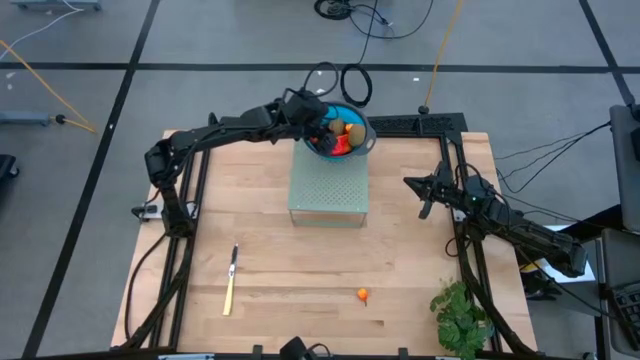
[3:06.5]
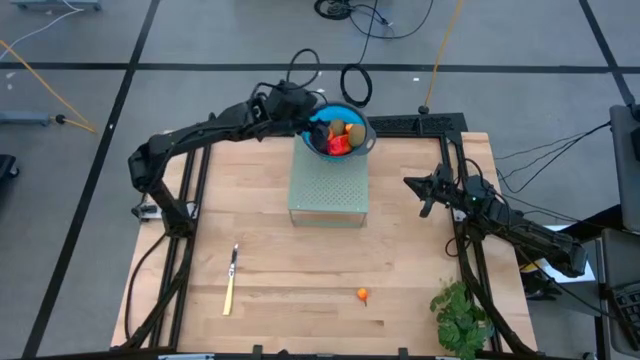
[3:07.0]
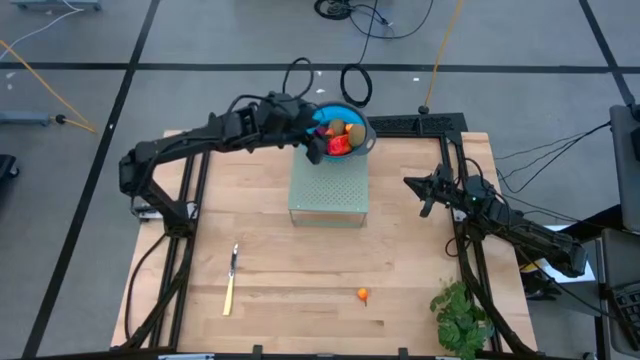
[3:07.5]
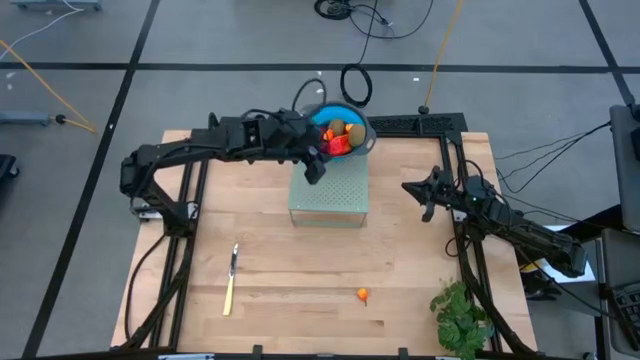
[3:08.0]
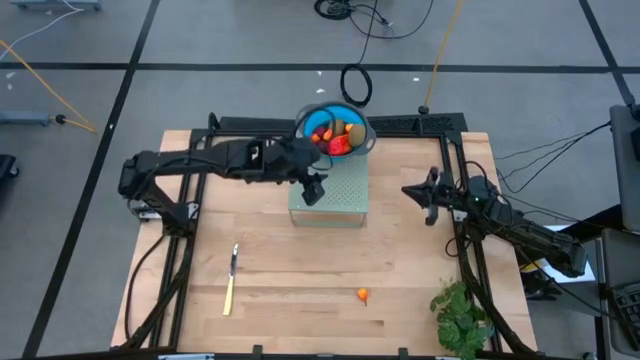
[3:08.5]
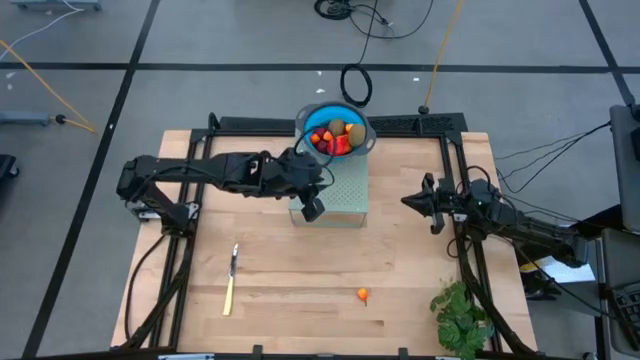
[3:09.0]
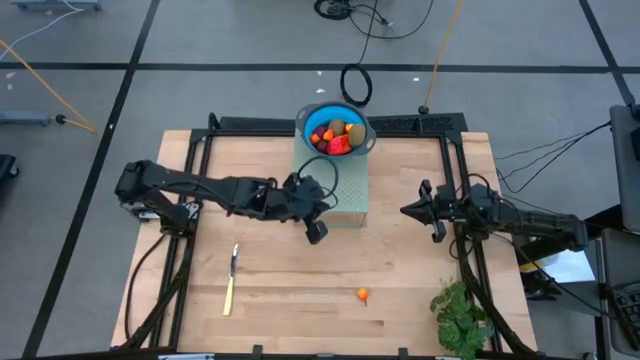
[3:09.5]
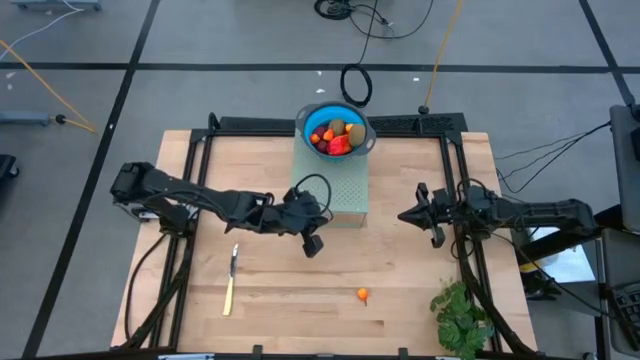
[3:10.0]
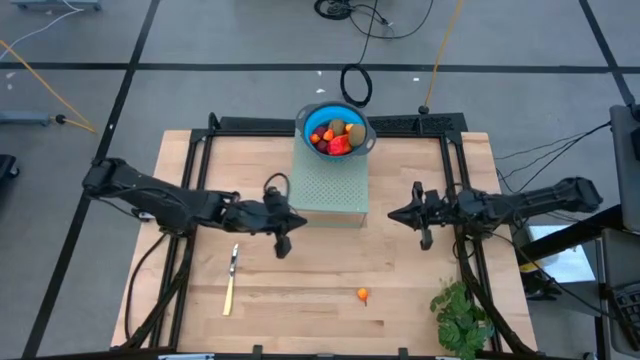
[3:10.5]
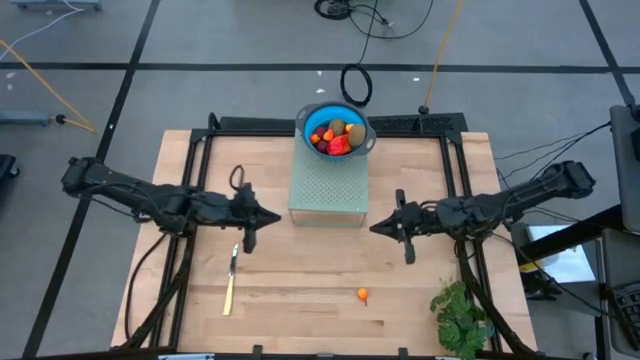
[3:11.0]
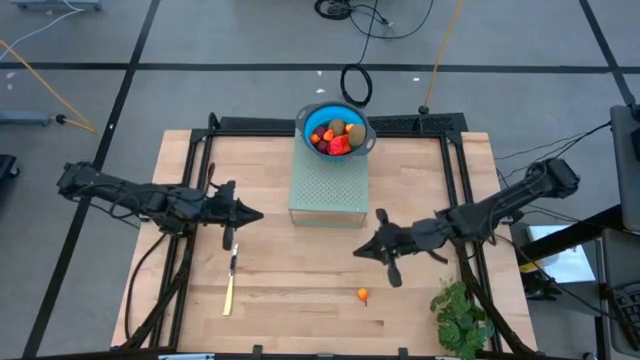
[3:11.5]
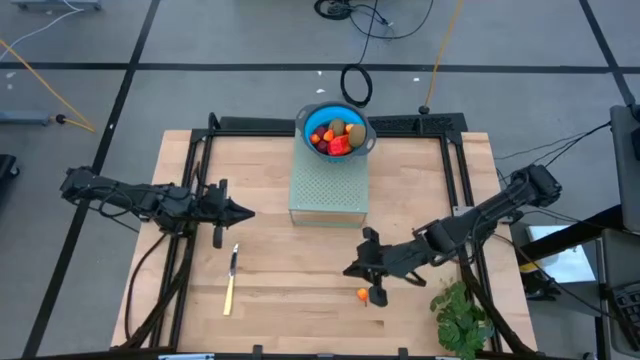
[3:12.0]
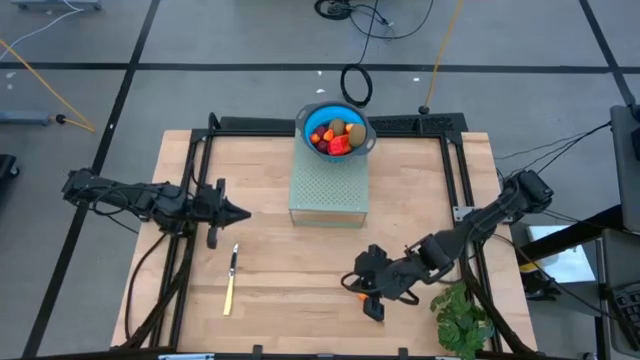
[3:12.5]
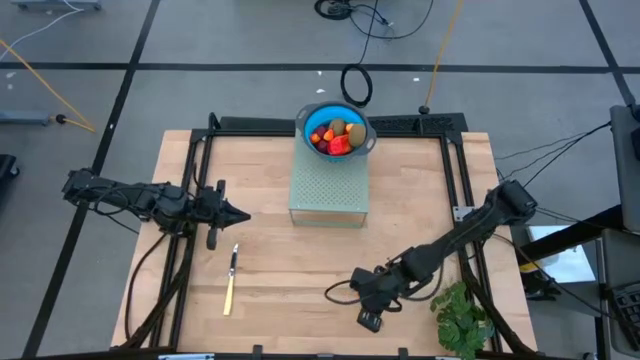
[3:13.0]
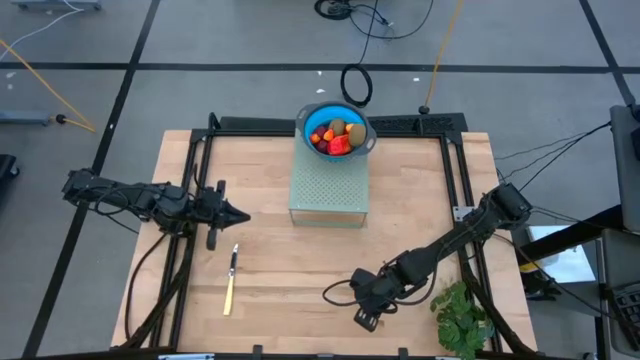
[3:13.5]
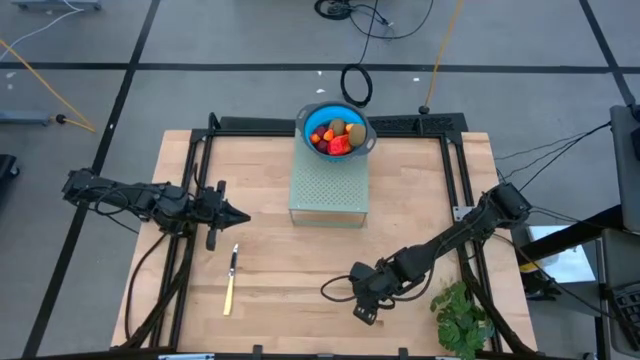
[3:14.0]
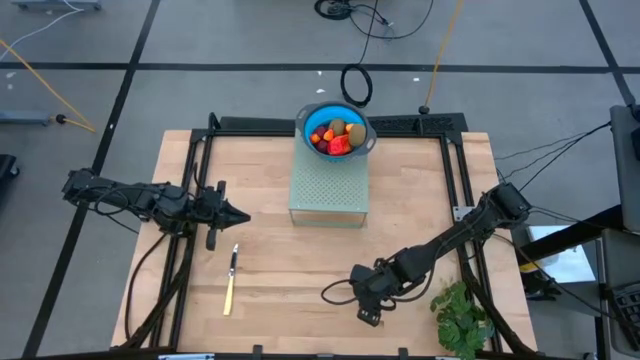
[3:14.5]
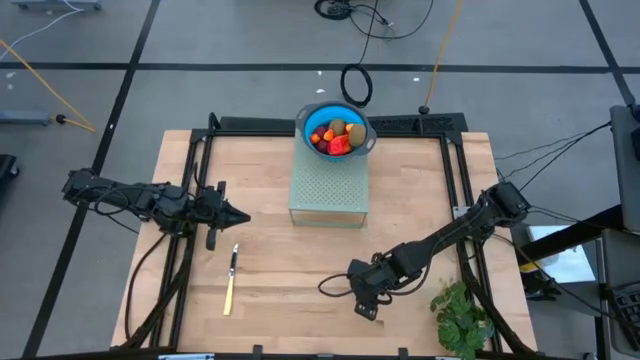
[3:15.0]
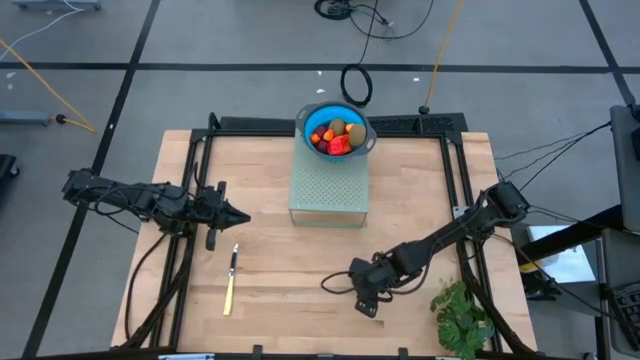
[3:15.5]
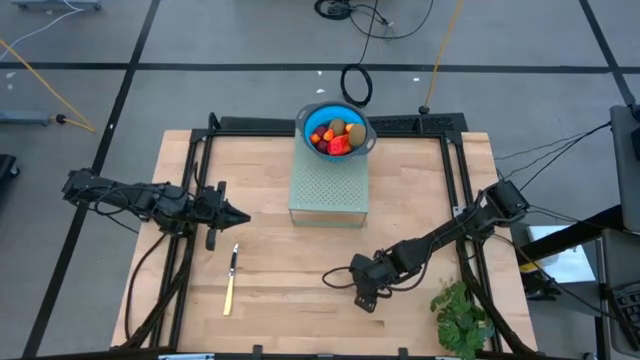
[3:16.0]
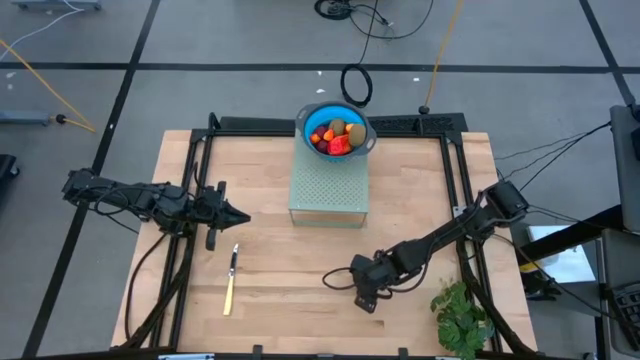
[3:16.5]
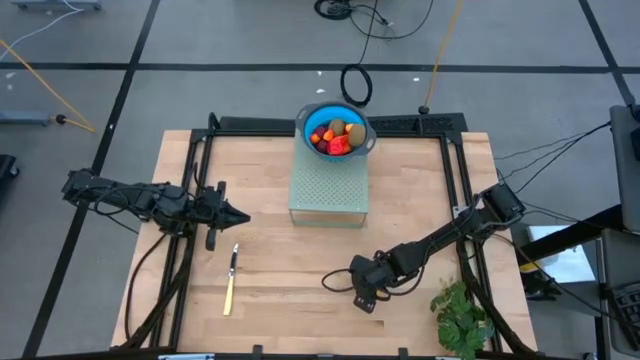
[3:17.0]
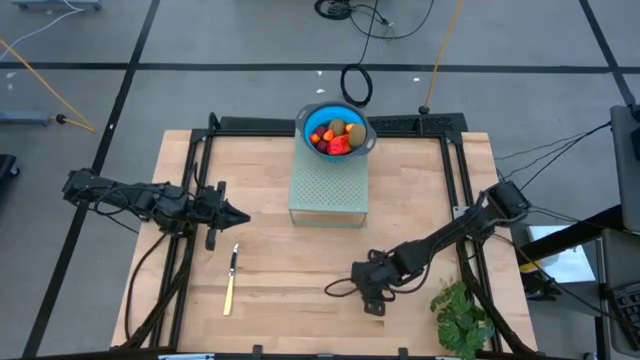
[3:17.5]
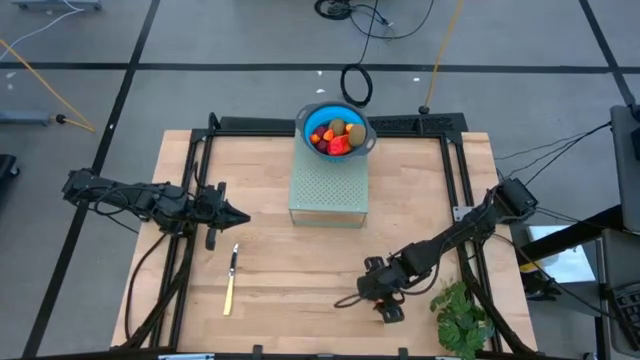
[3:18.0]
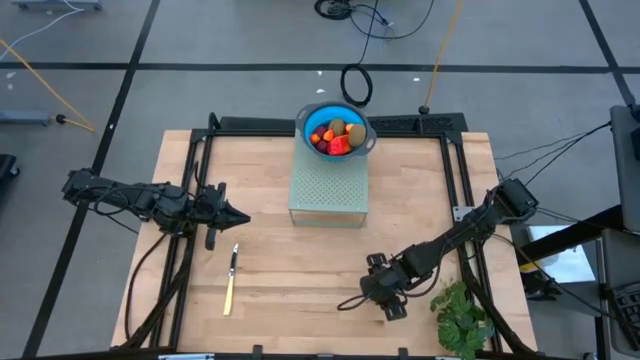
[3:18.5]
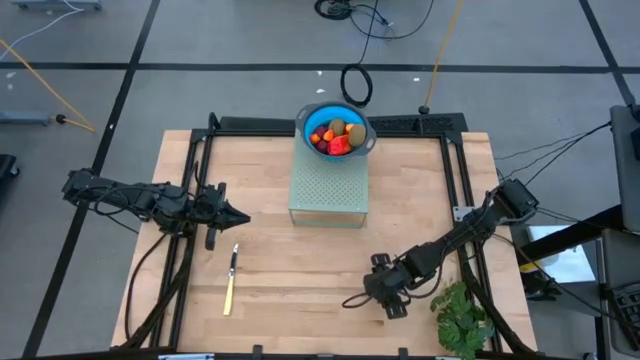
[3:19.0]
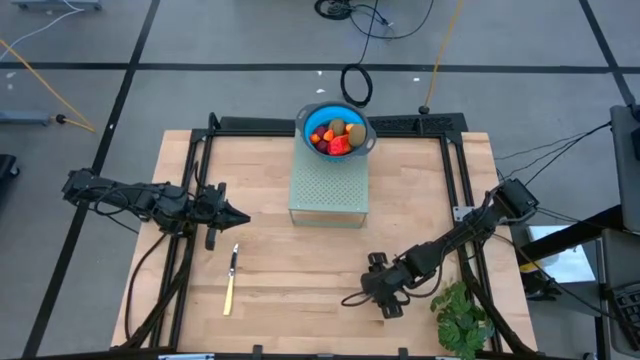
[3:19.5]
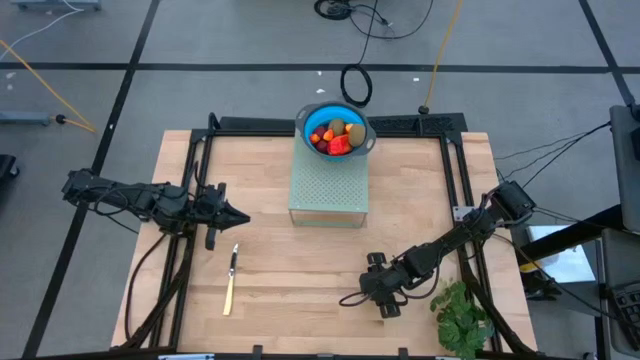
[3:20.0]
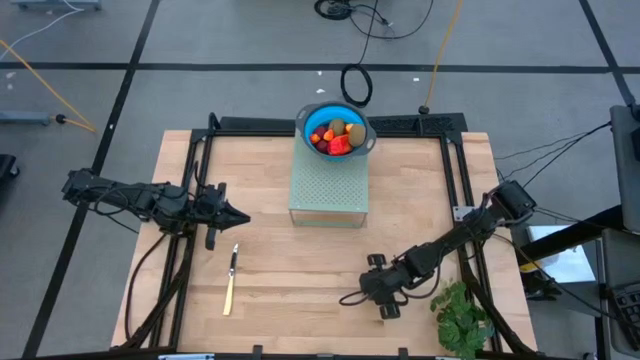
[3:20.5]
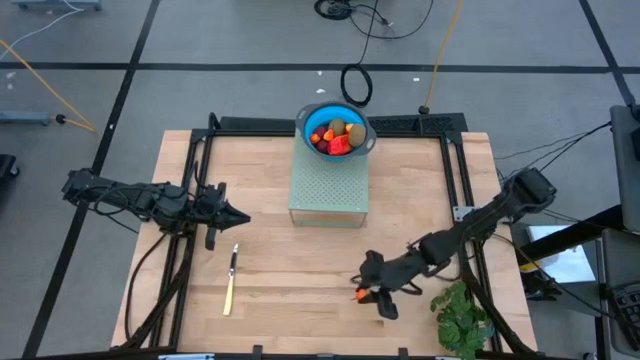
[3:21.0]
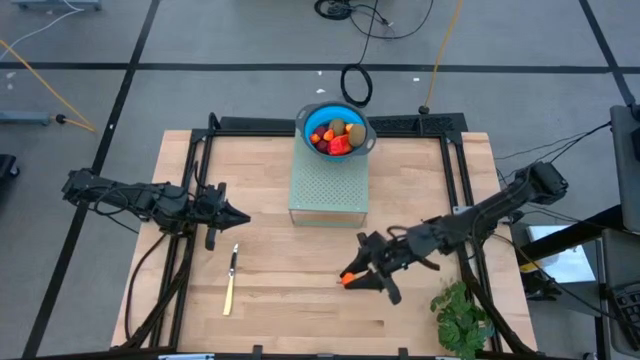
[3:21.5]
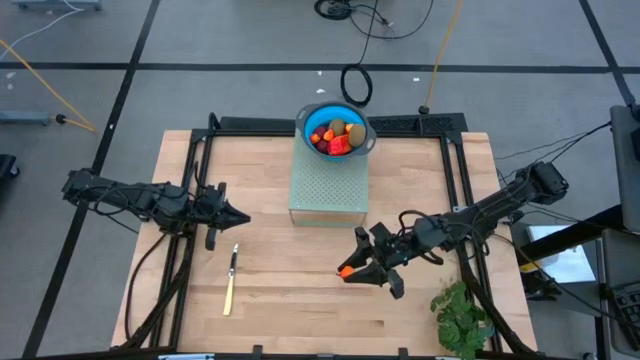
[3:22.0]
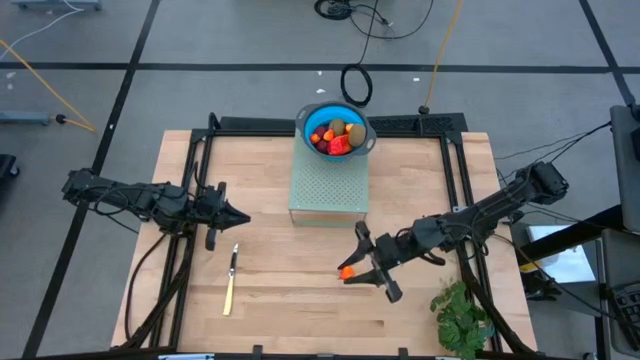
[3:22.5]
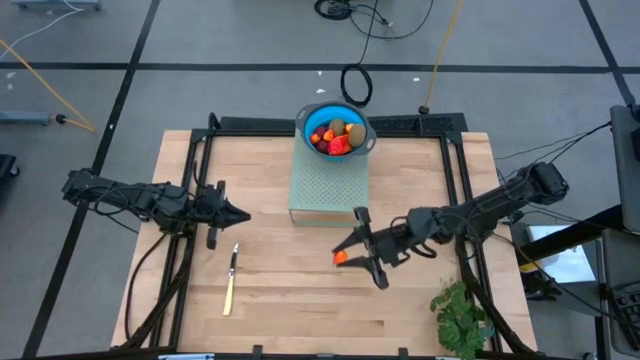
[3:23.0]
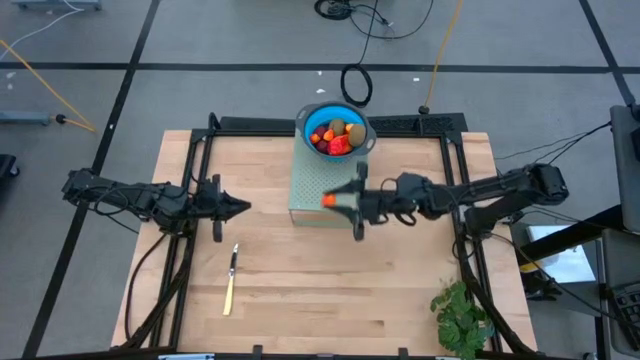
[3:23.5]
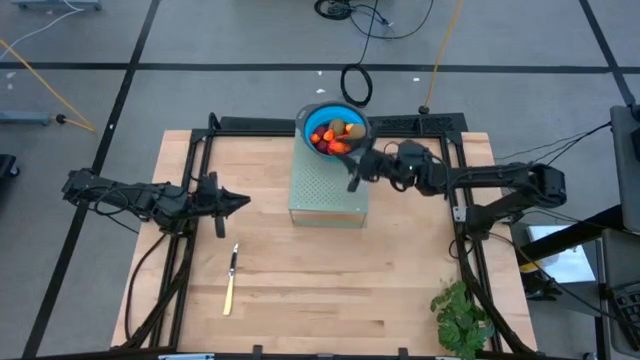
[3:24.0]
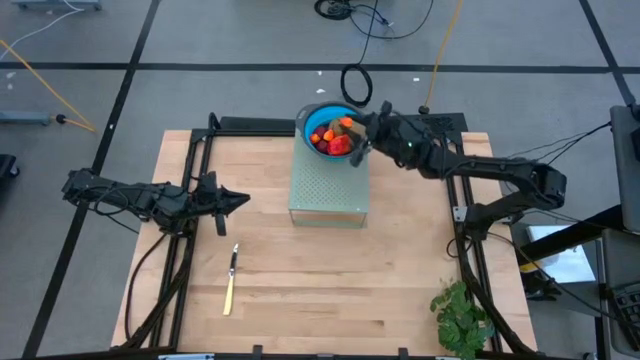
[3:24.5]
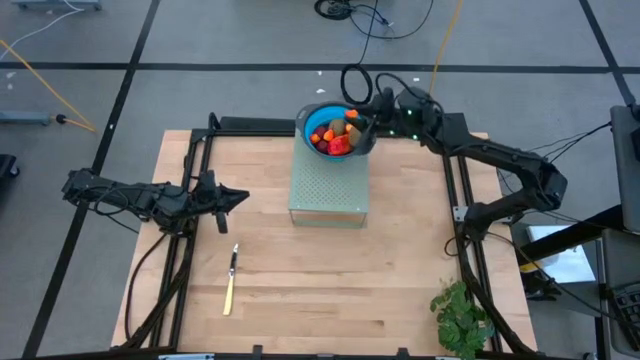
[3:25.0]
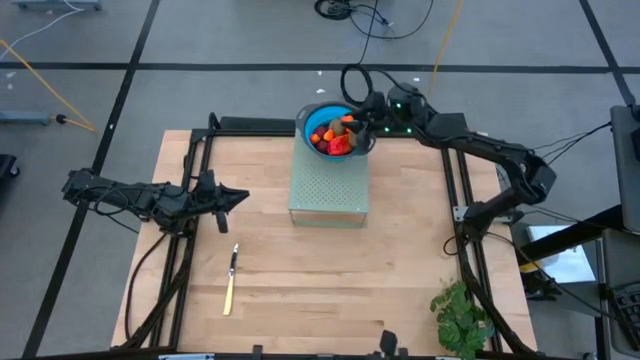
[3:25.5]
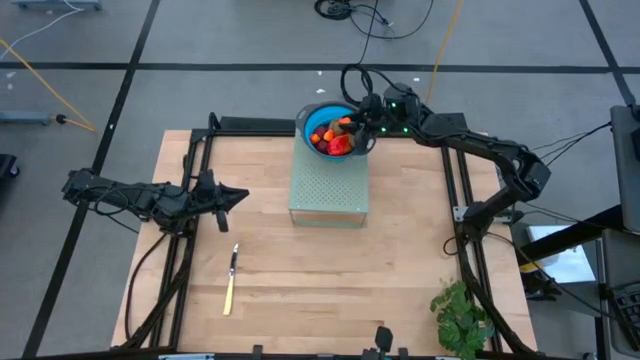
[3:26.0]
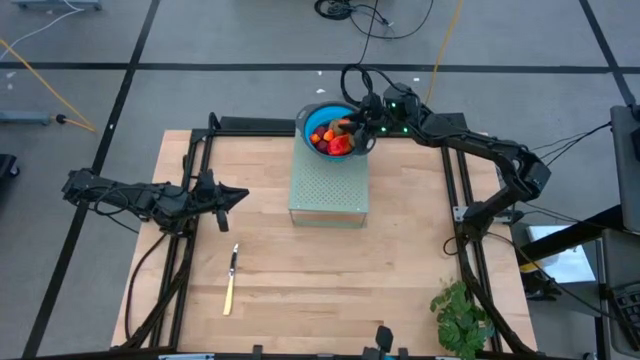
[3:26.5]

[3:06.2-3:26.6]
Task: Pick & Place Fruit
Put the peach into the blue strainer bowl on the shelf
